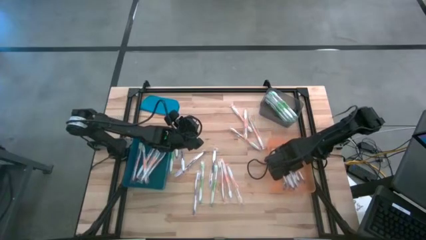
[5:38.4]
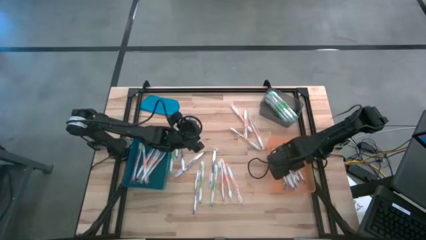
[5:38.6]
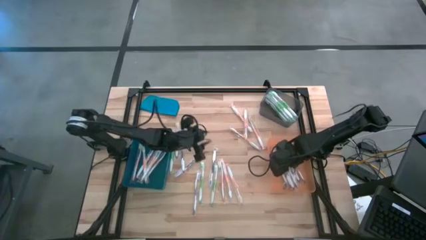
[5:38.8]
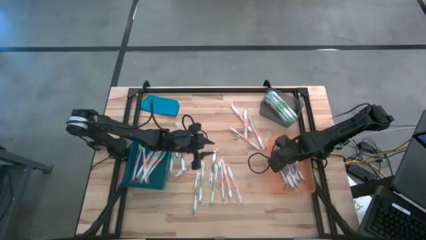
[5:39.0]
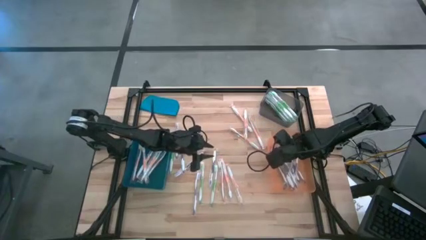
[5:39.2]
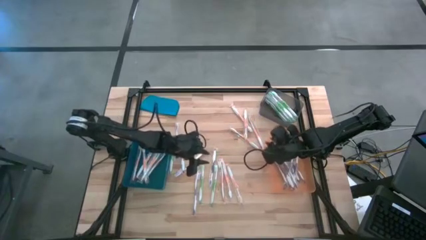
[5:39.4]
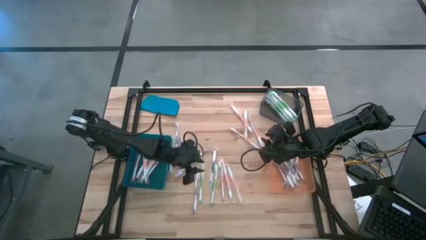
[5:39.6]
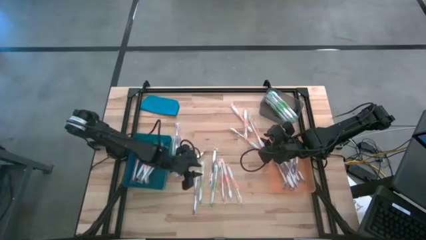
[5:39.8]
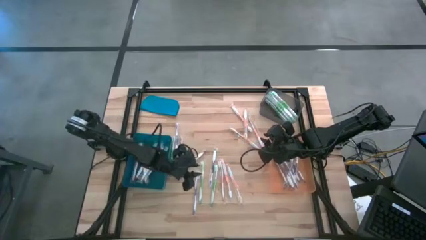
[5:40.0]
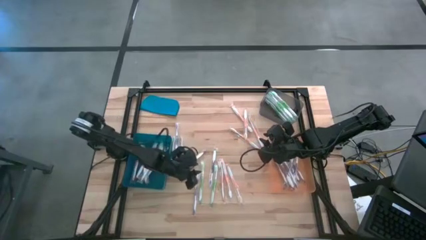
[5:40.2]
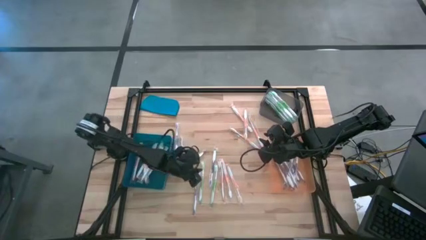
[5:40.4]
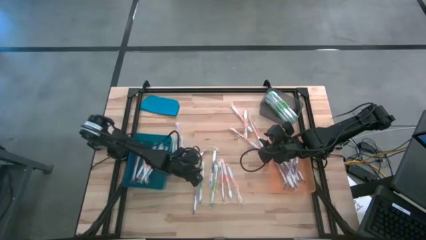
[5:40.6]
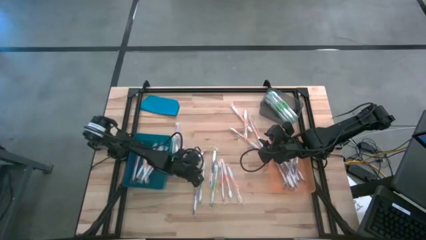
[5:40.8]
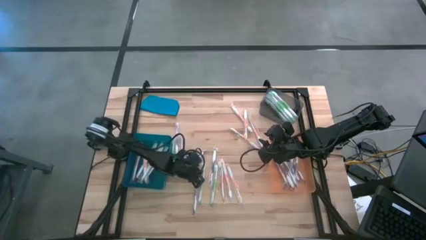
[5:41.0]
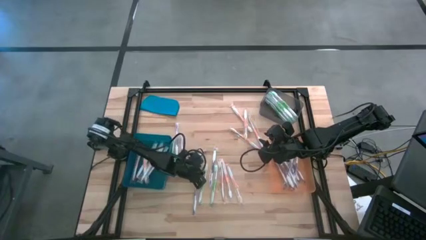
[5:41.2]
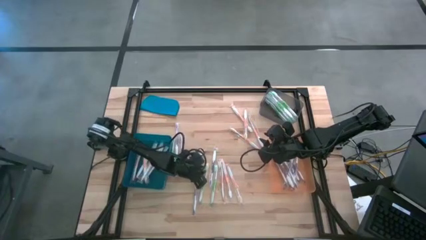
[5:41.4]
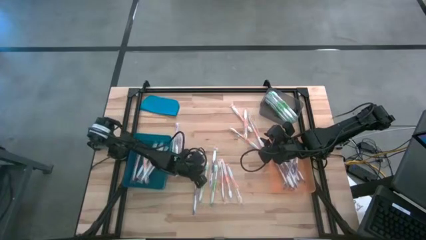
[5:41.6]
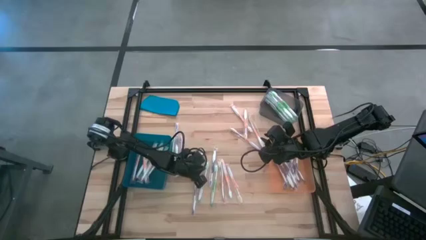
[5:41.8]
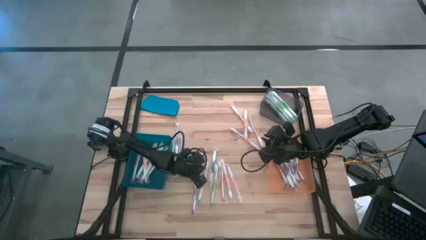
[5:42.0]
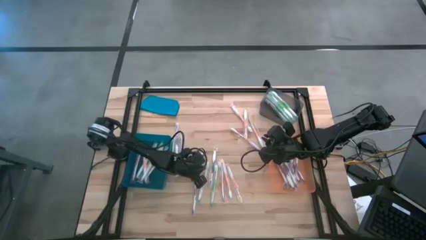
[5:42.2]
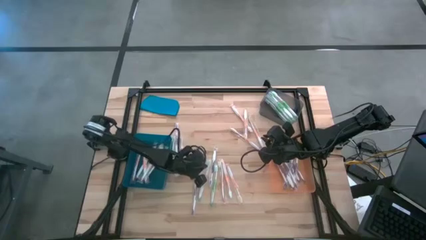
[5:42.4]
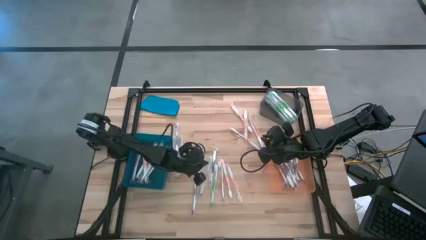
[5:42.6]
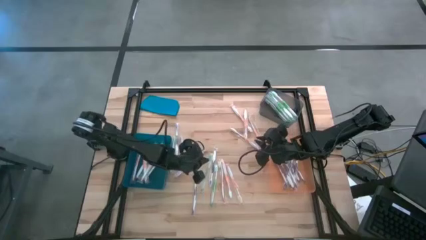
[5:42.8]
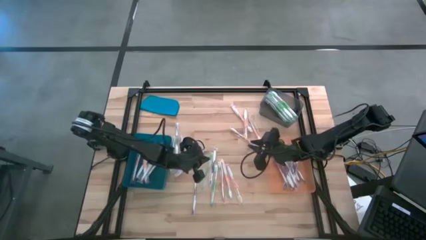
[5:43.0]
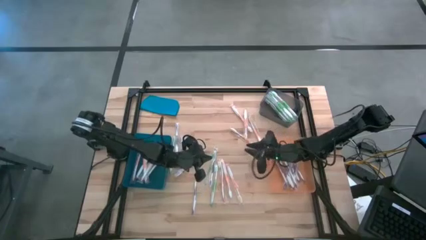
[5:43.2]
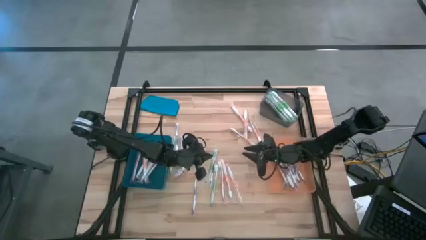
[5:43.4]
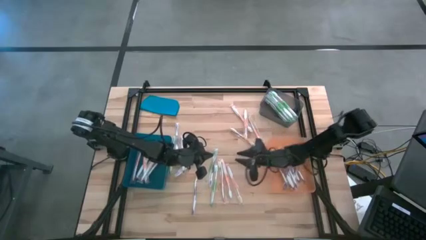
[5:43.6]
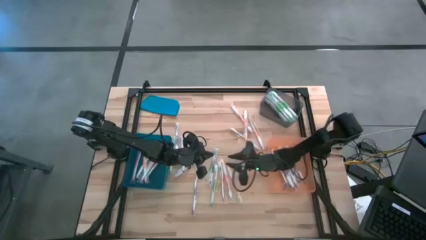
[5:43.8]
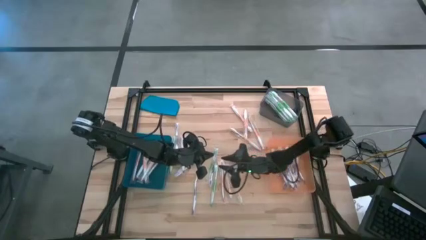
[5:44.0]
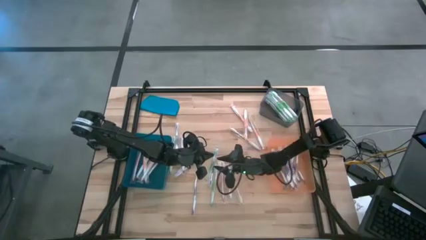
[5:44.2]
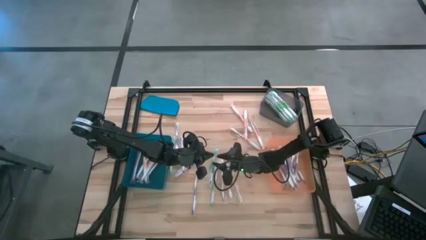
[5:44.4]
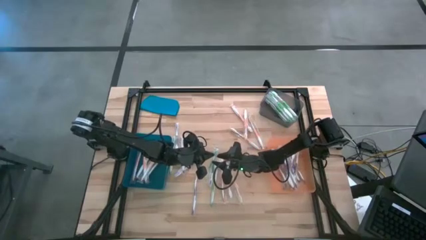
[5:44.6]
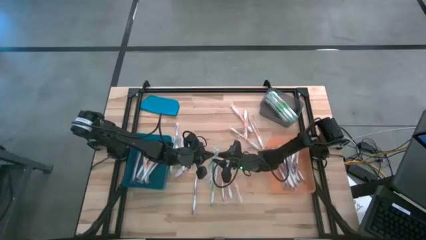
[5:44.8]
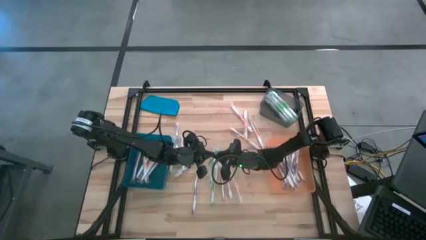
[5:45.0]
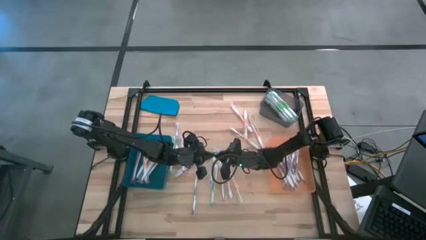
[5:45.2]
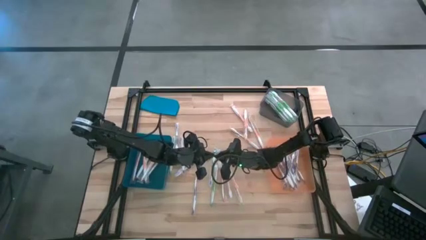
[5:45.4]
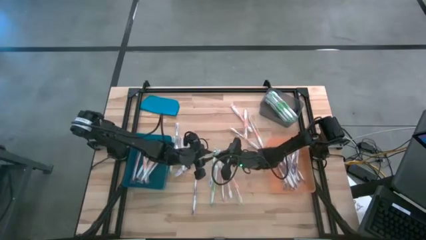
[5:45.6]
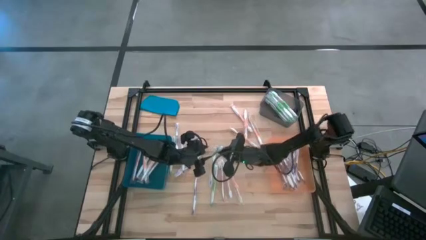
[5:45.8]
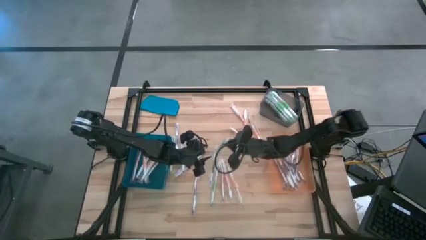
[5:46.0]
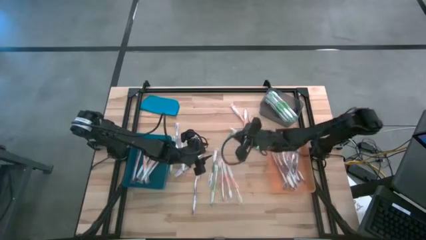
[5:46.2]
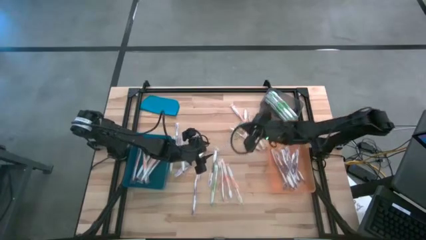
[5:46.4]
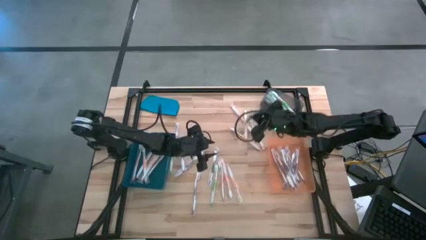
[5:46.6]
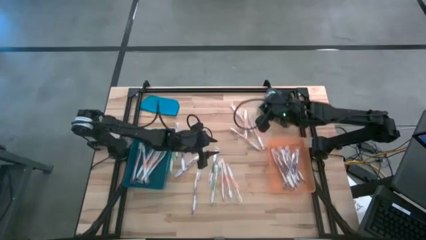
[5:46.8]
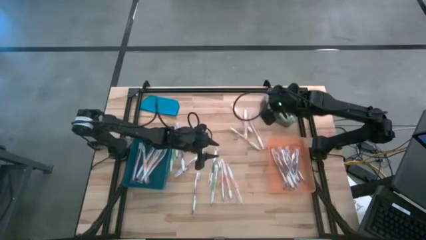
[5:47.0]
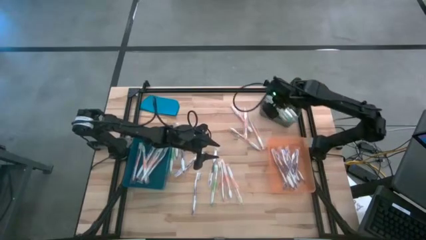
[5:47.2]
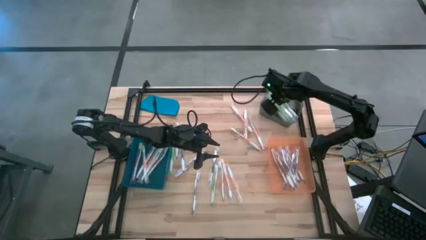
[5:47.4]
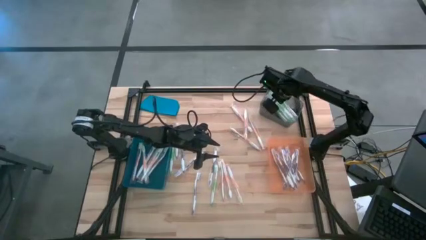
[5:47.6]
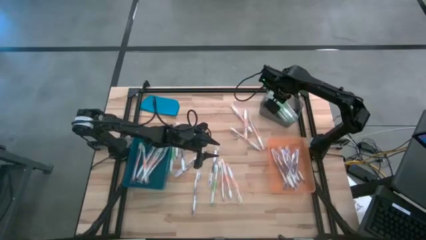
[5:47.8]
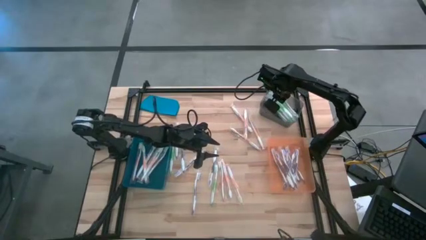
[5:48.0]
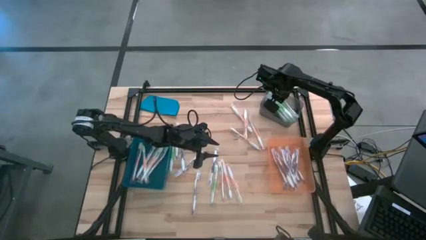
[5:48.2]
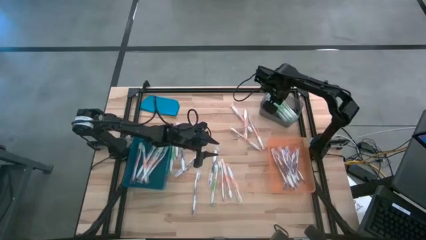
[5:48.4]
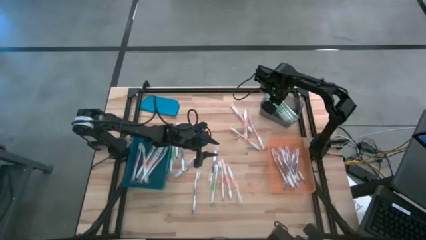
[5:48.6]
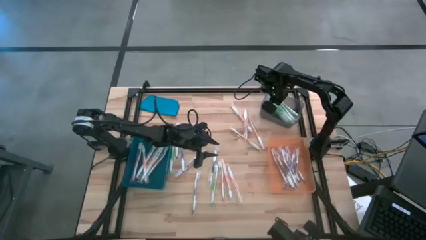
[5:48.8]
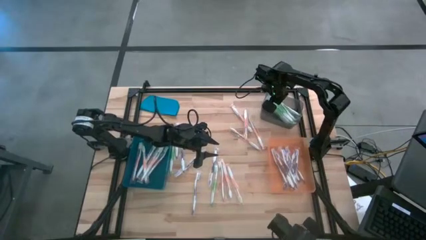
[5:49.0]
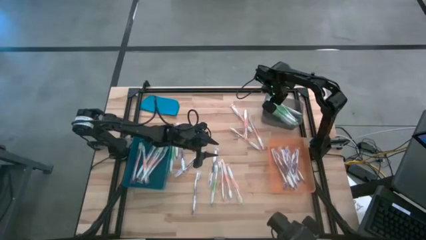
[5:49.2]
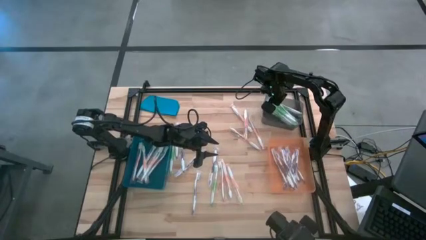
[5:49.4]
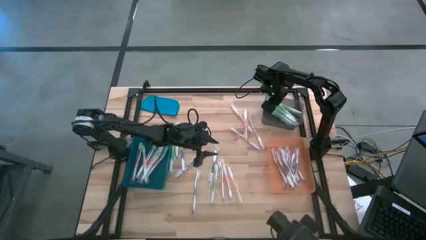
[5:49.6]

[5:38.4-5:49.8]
Task: Pick & Place Toothbrushes
Put the green toothbrush into the black bin

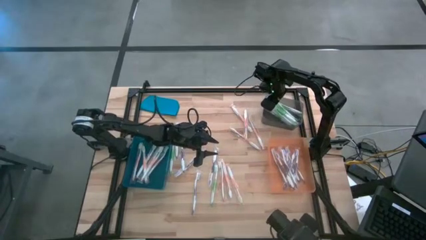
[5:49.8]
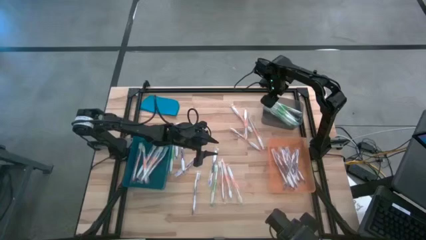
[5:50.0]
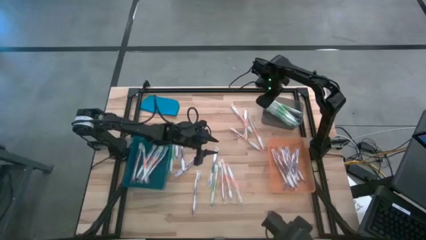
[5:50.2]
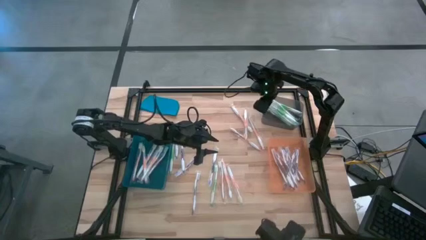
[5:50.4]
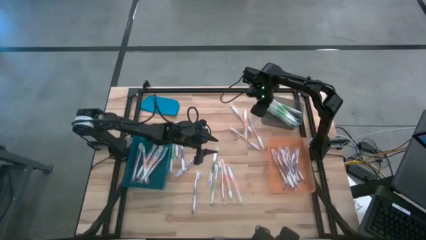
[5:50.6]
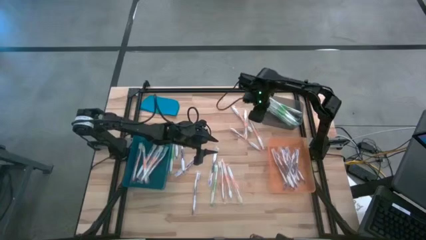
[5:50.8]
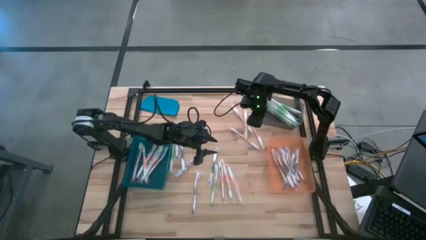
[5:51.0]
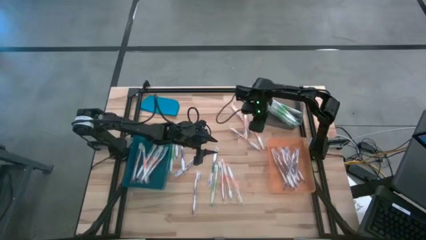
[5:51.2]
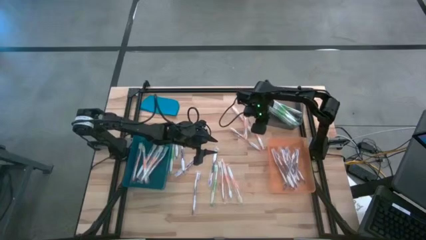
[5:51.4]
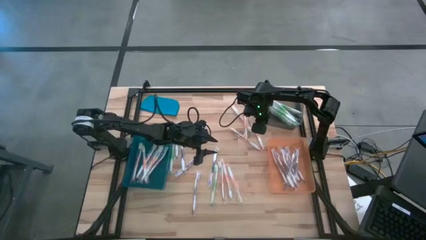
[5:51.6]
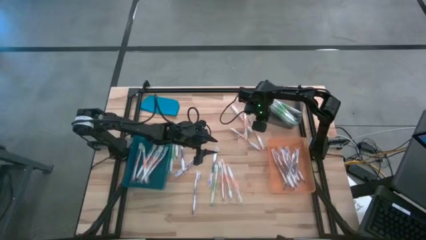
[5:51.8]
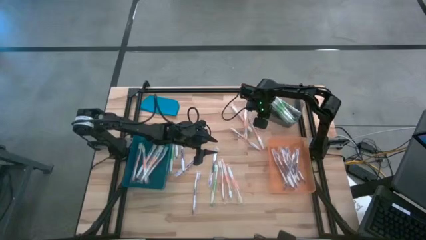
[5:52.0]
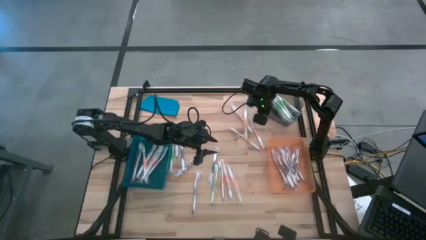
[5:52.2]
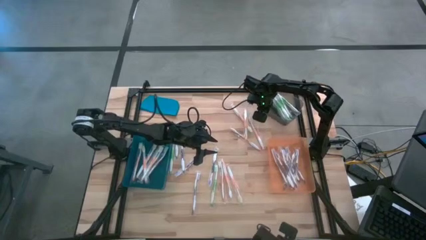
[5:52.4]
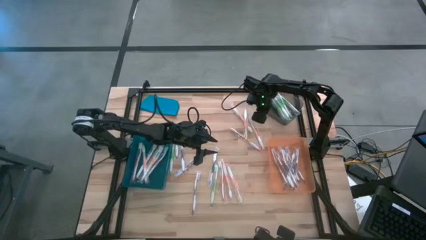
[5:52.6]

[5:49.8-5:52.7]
Adjust the black bin
